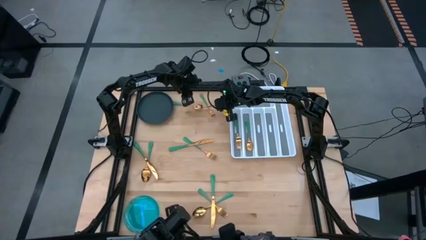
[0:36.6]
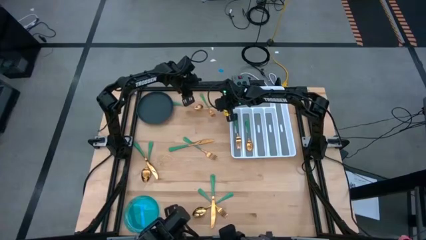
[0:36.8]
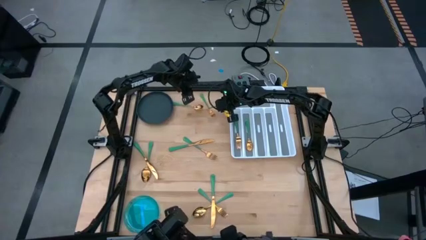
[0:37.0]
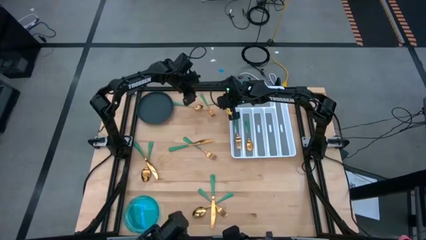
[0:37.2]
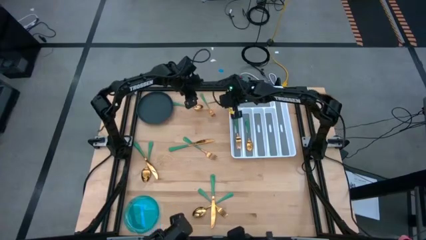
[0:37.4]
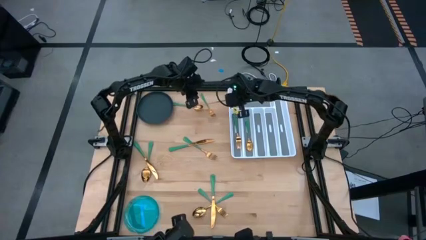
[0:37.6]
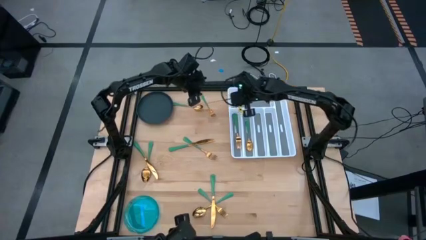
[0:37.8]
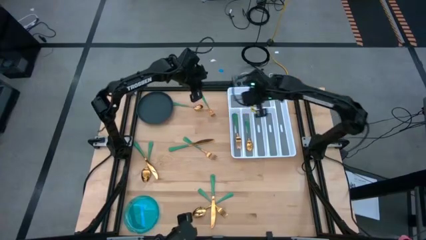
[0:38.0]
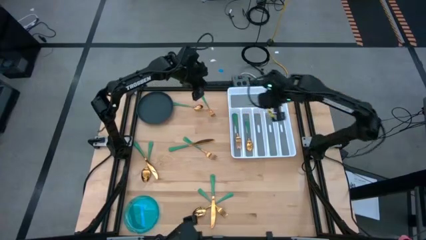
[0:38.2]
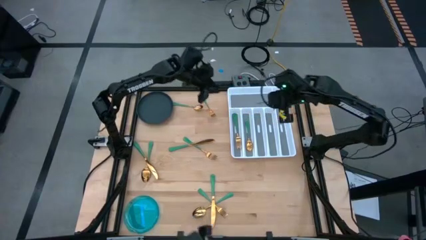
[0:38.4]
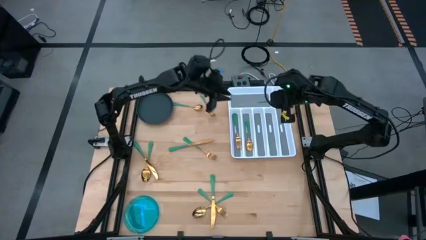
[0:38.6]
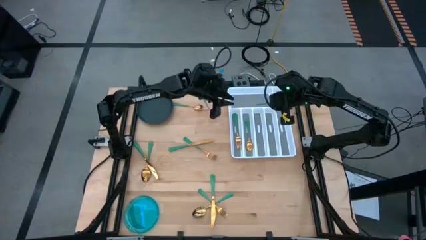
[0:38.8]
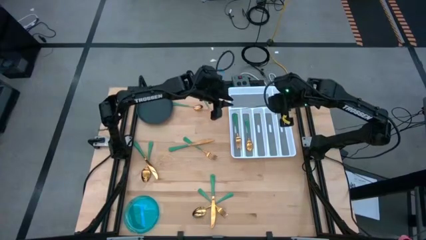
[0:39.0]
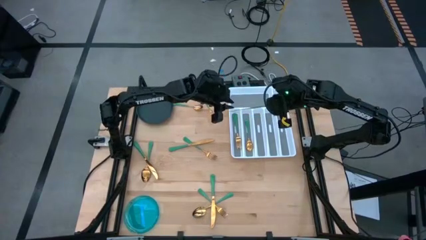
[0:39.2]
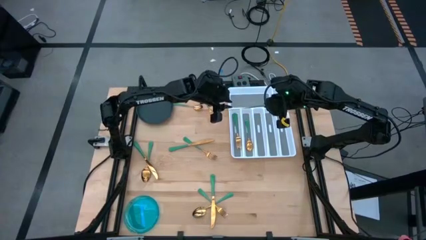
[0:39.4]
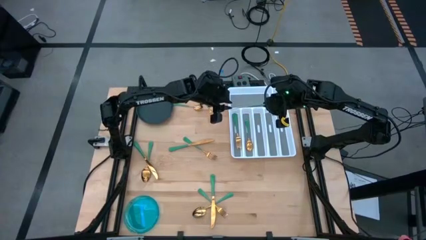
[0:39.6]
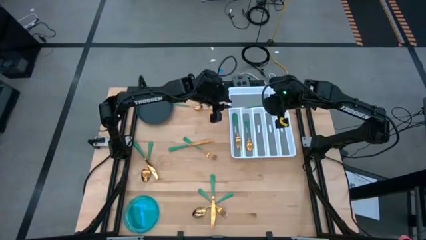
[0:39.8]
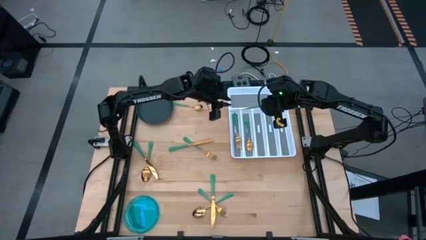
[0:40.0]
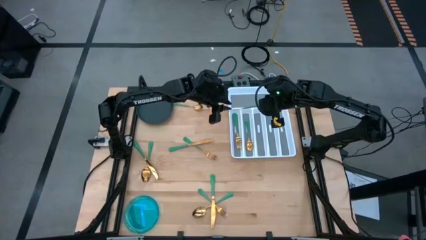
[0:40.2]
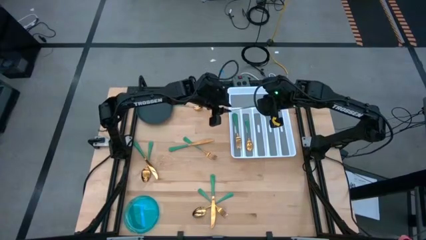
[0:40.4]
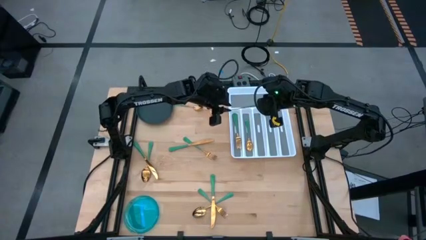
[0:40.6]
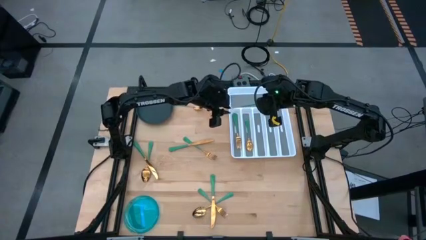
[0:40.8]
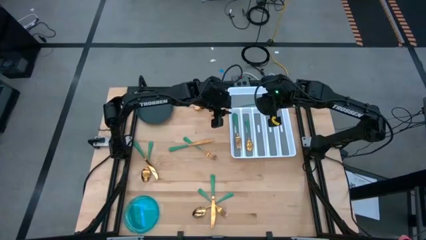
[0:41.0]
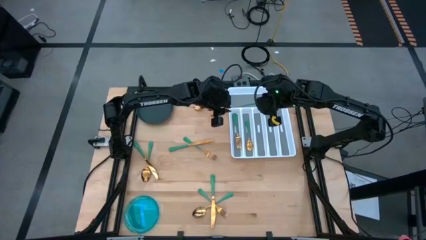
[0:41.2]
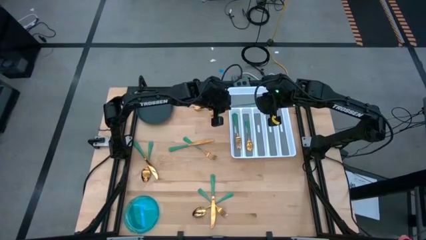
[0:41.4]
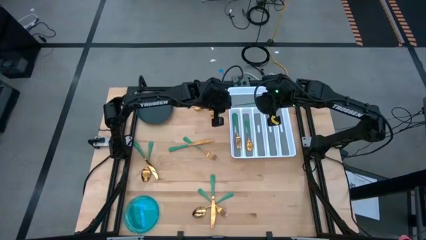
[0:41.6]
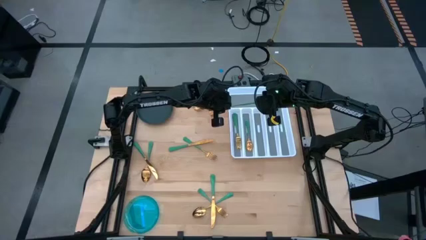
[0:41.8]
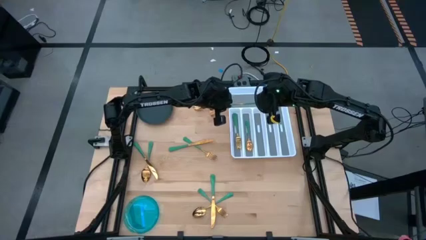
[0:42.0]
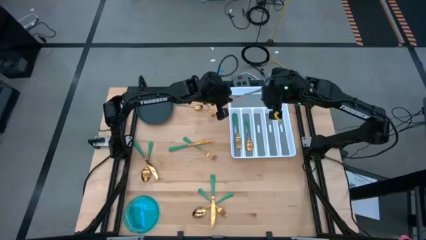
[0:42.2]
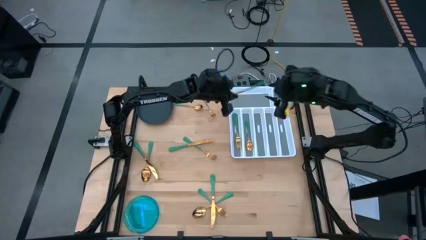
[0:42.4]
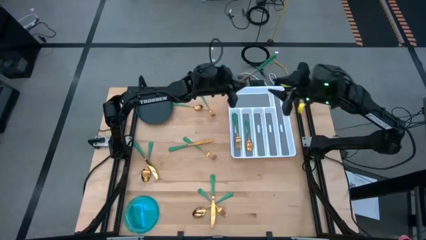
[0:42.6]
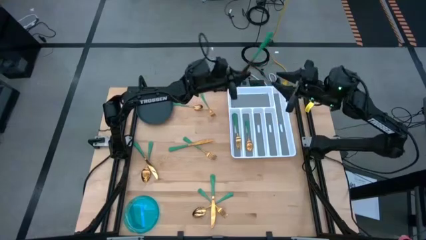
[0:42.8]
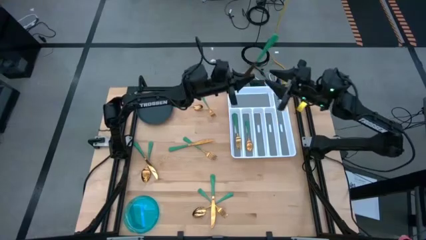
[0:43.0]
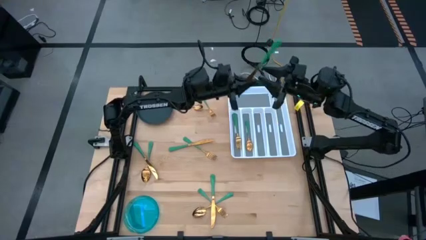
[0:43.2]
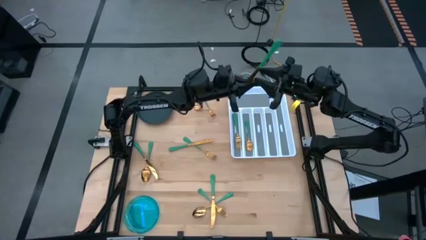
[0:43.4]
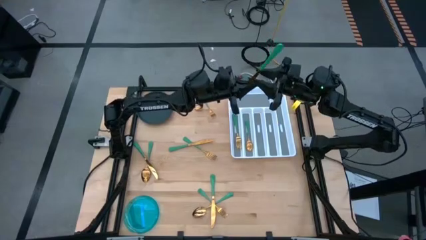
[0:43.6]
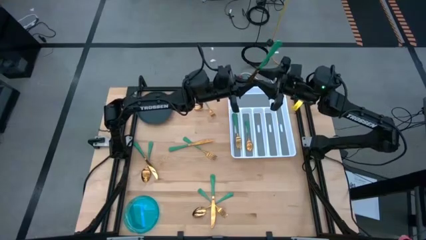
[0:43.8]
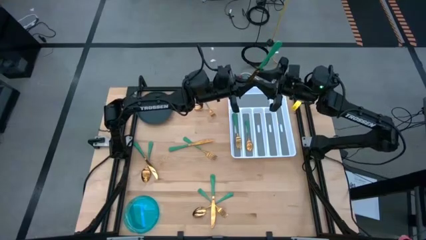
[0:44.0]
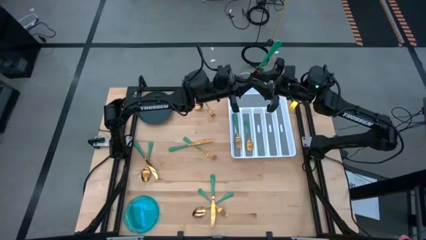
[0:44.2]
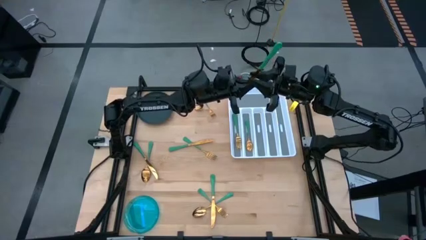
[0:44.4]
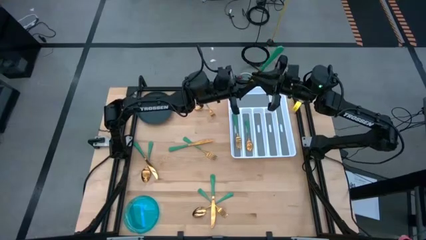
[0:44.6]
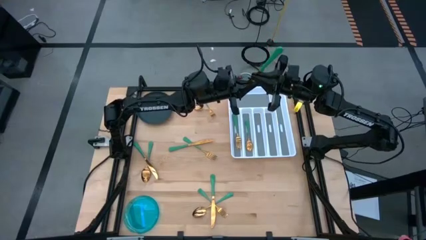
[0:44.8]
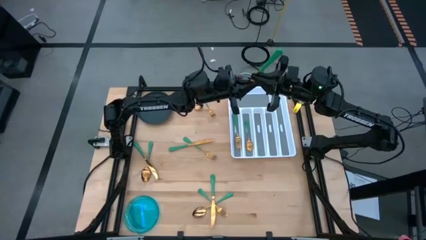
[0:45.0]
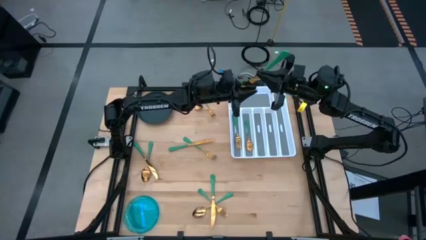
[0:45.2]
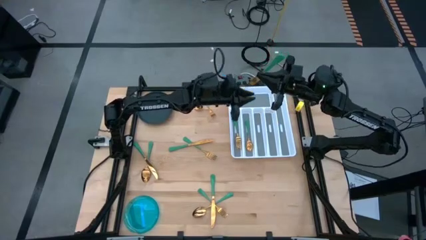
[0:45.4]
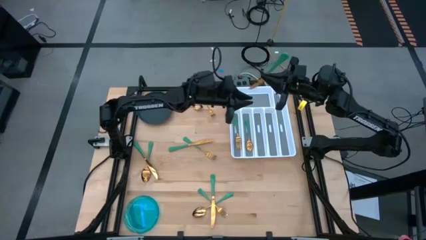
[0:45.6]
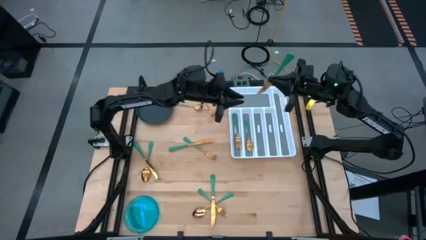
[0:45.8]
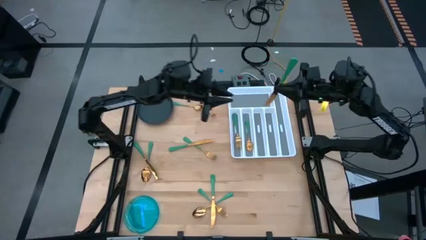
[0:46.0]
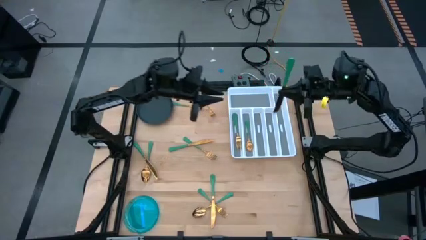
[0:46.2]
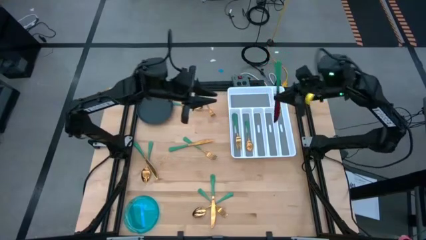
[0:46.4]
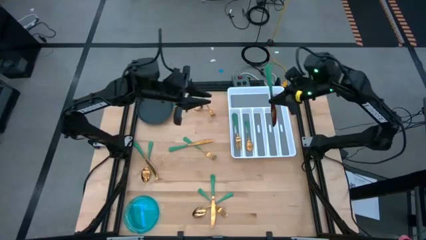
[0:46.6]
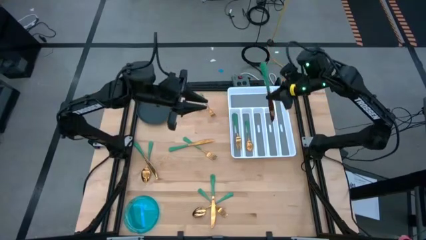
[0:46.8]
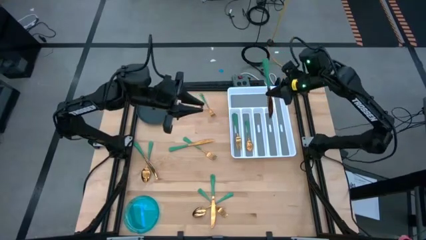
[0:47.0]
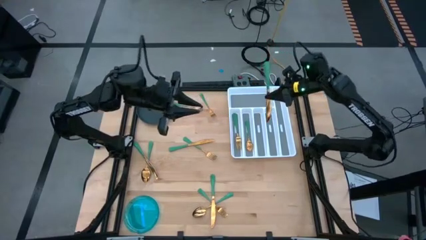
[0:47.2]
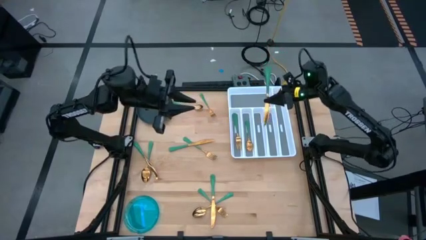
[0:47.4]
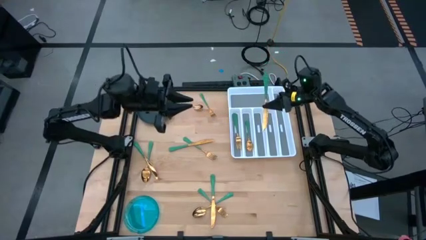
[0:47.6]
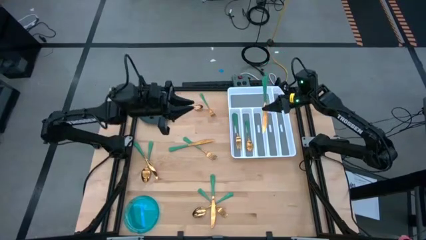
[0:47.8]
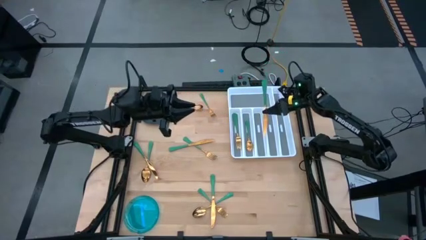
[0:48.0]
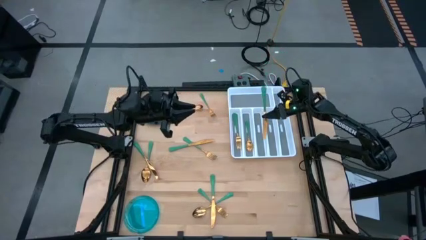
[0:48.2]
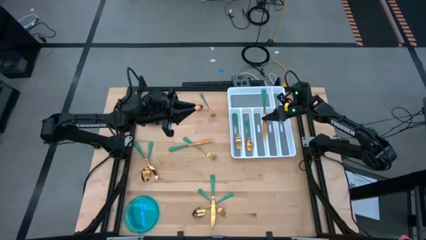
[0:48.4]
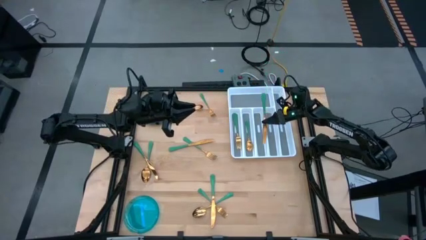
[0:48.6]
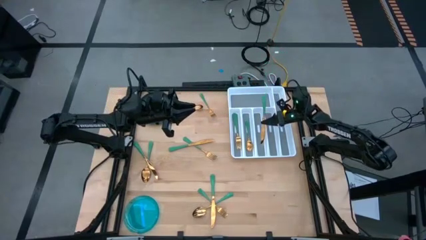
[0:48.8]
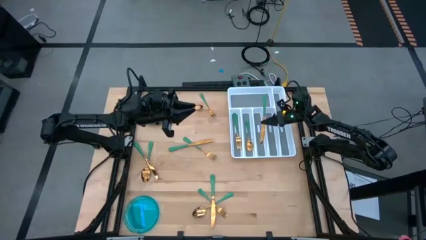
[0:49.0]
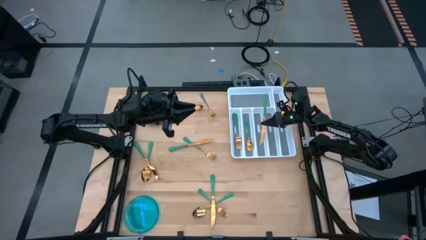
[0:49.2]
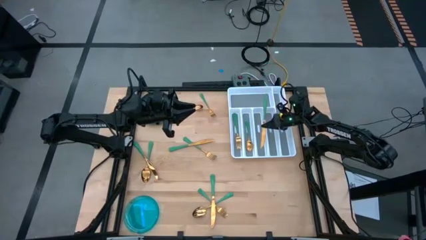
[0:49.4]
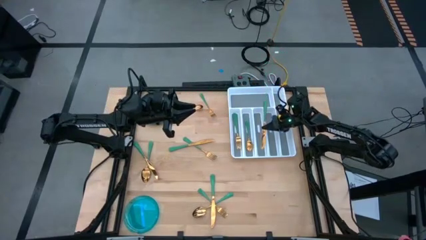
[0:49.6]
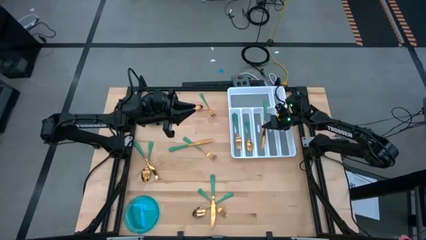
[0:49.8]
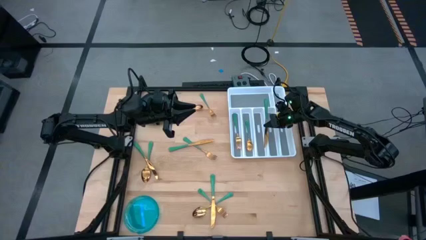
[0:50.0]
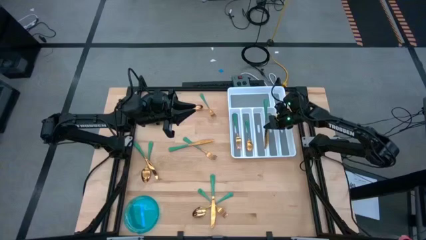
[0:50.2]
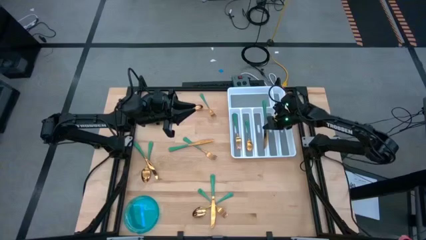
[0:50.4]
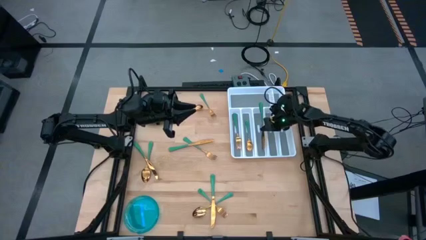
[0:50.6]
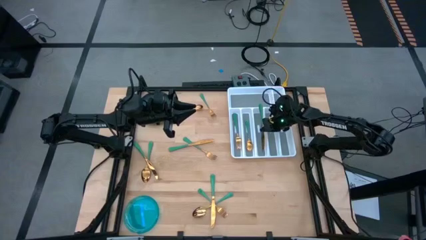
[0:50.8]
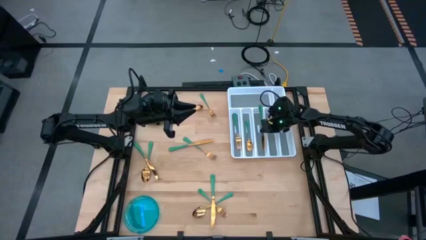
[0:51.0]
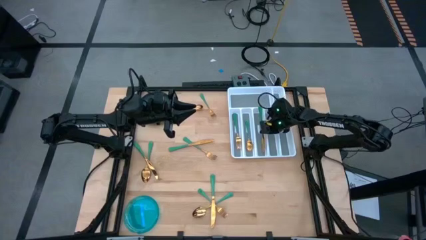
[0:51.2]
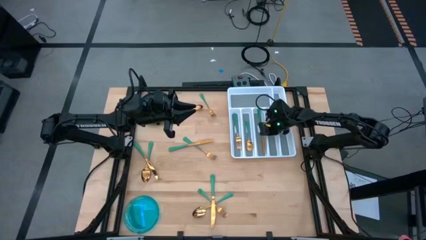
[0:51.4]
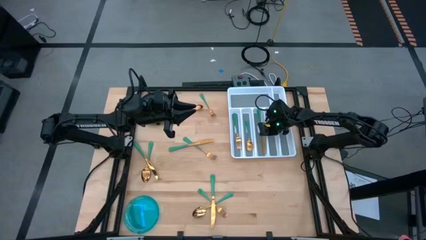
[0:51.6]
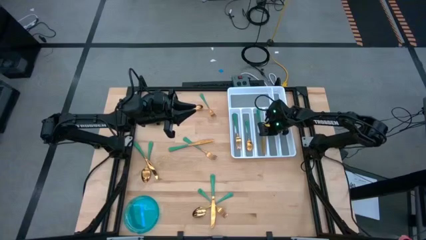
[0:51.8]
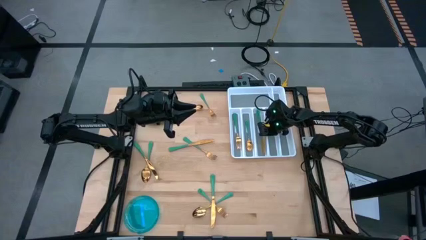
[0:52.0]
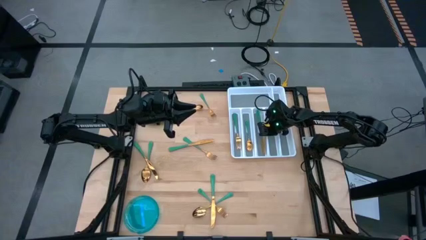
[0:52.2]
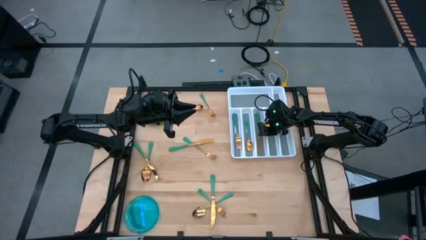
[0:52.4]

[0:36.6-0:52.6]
Task: Sort silverware
Put the green knife into the white silverware organizer
